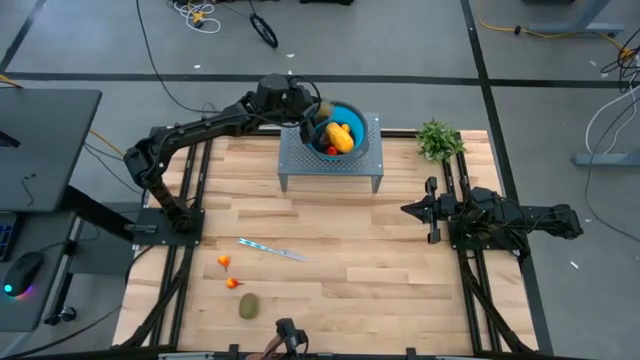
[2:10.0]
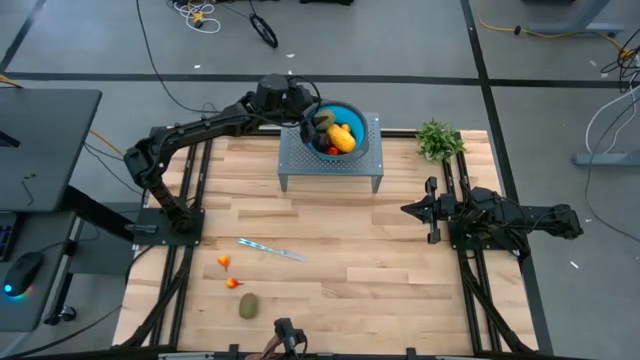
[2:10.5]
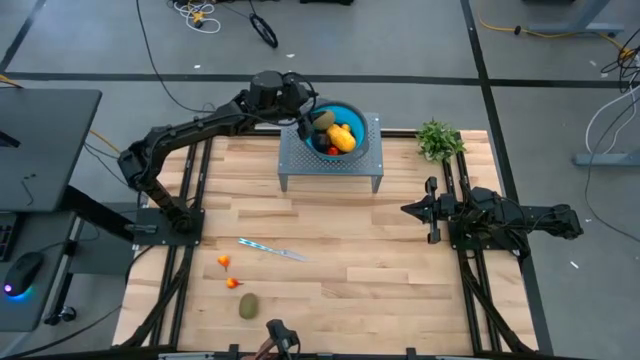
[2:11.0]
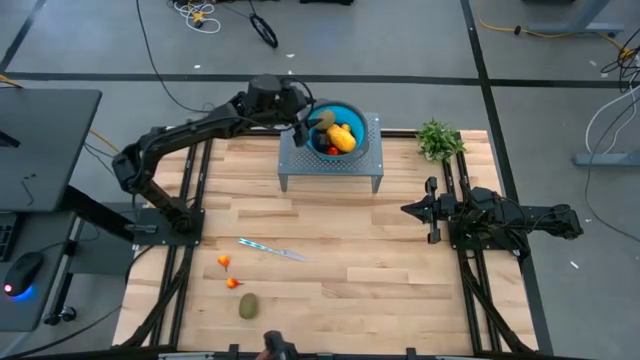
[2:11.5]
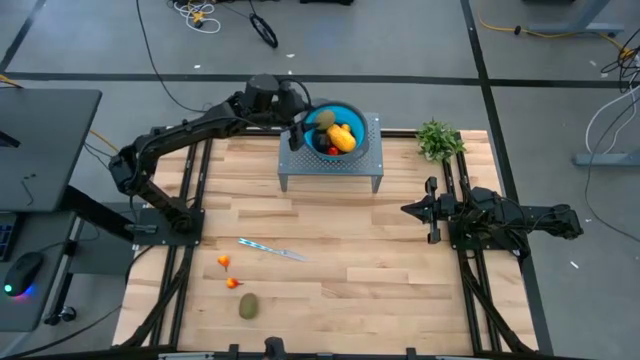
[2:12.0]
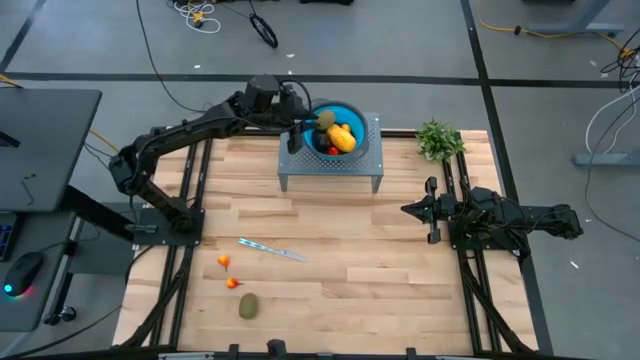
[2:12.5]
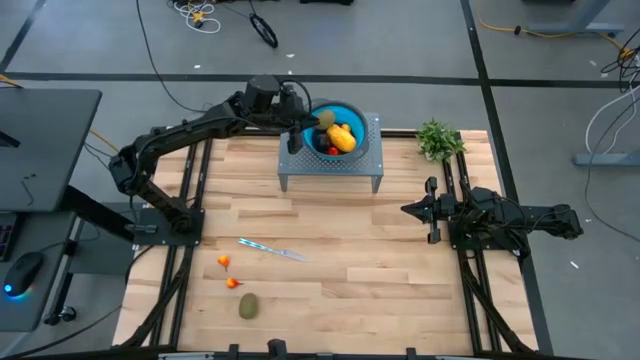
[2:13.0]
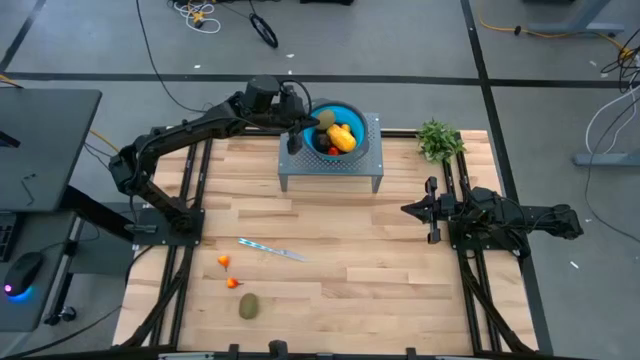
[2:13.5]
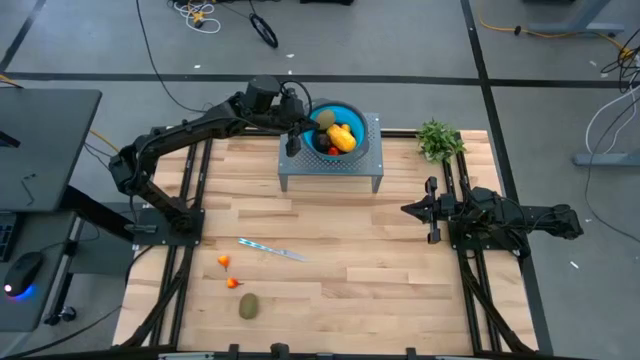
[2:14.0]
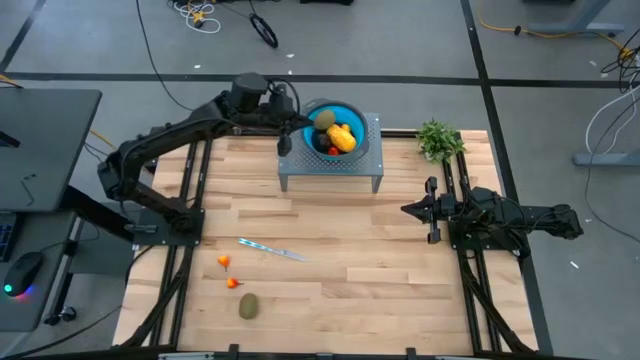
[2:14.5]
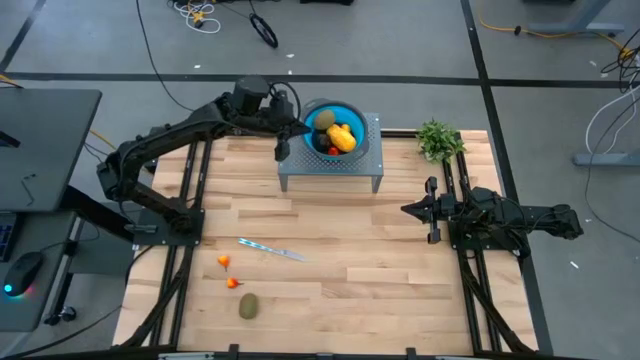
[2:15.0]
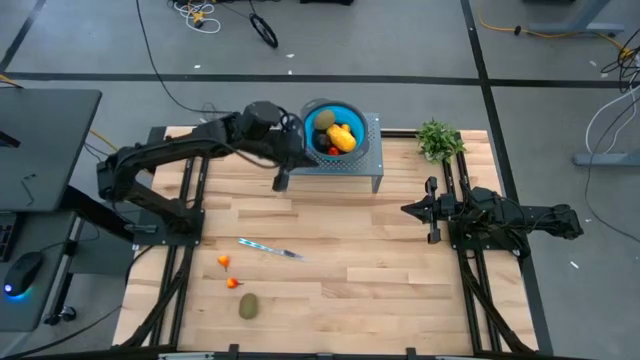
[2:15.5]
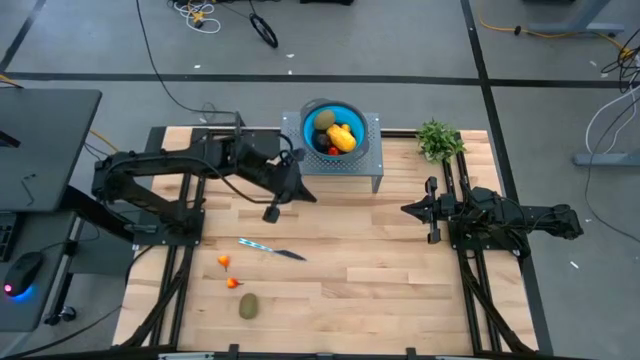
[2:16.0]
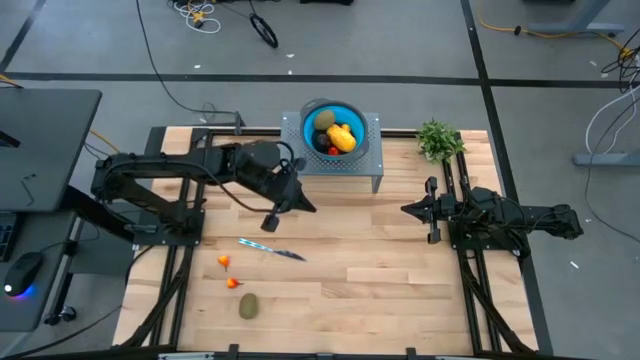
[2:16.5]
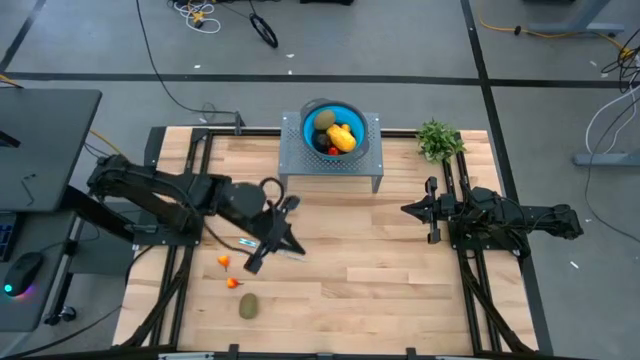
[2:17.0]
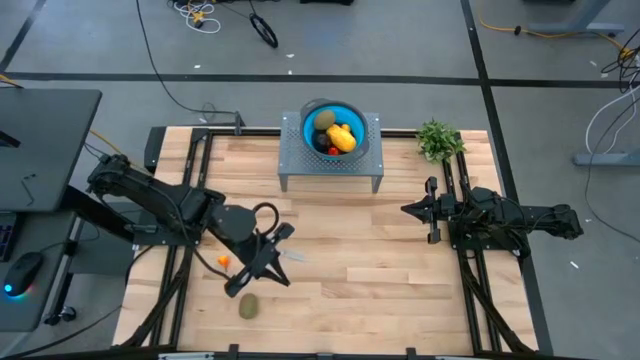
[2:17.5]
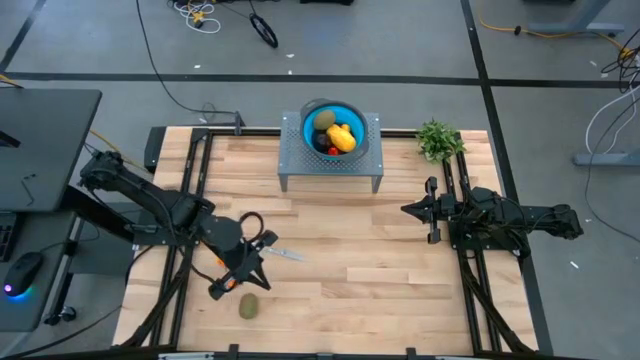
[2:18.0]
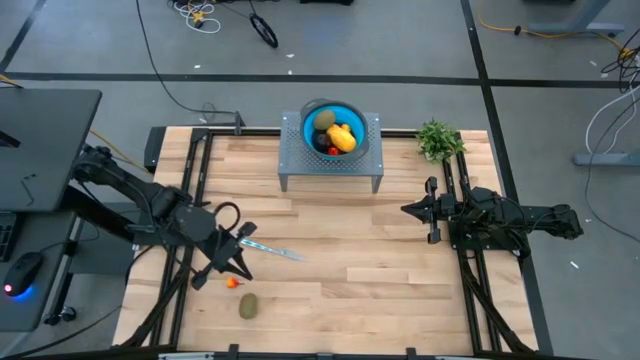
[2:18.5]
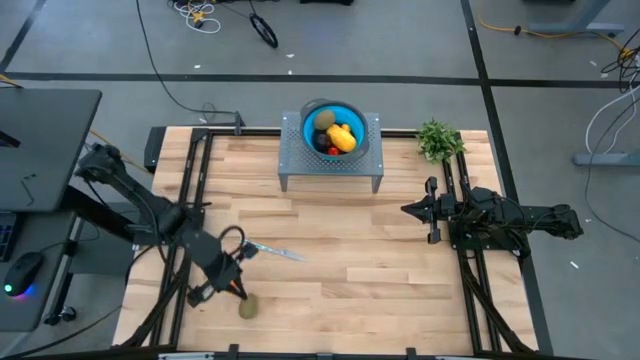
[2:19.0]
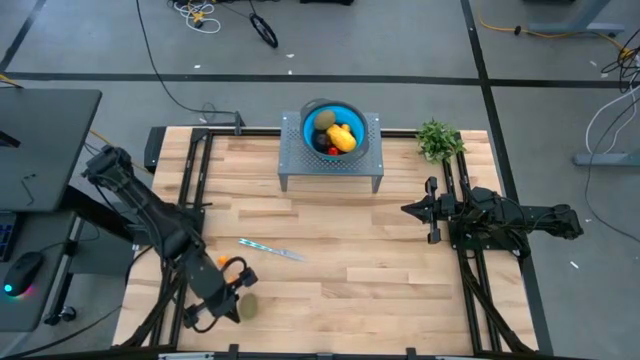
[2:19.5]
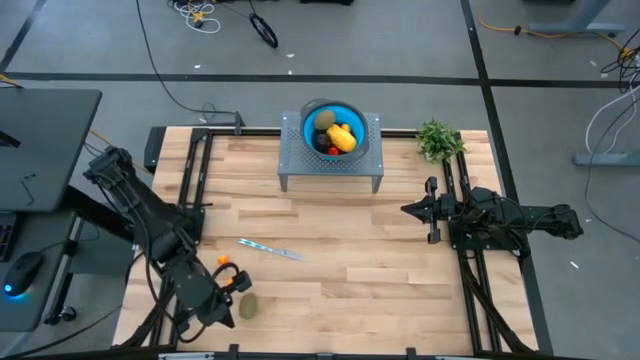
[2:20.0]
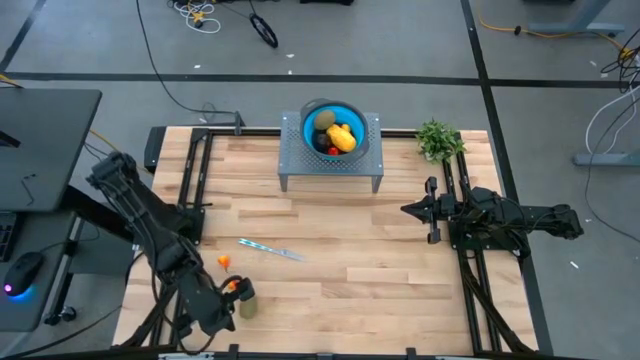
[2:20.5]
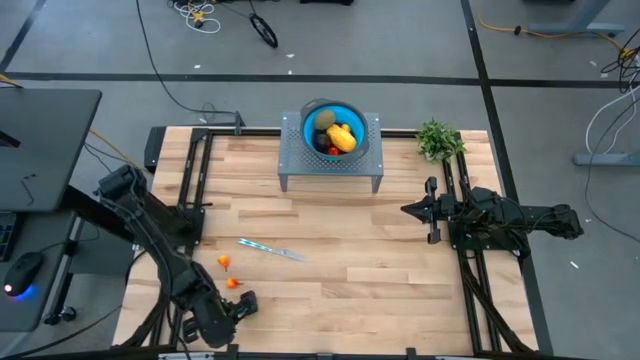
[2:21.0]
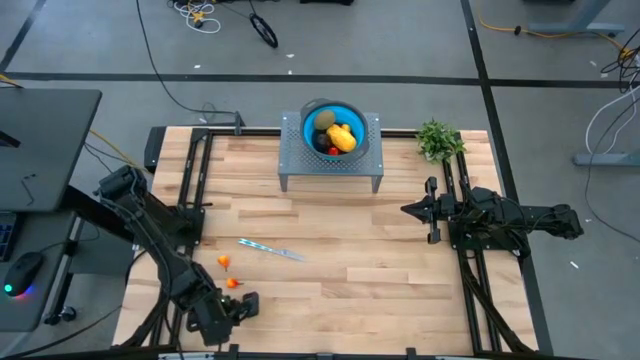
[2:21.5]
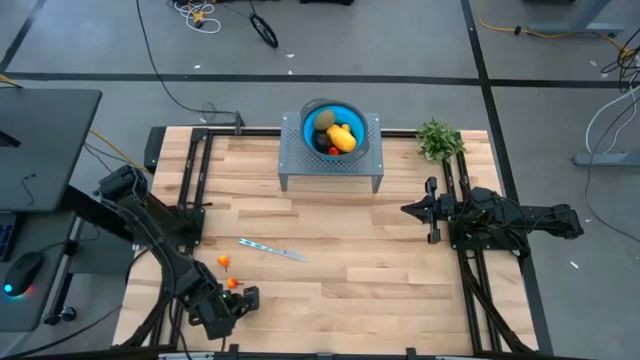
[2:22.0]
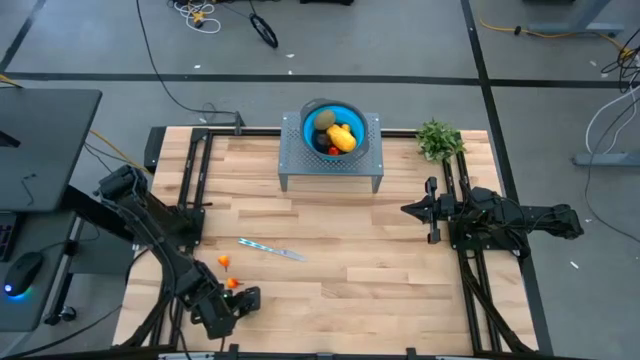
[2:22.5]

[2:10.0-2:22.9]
Task: Pick & Place Fruit
Put the kiwi into the blue bin

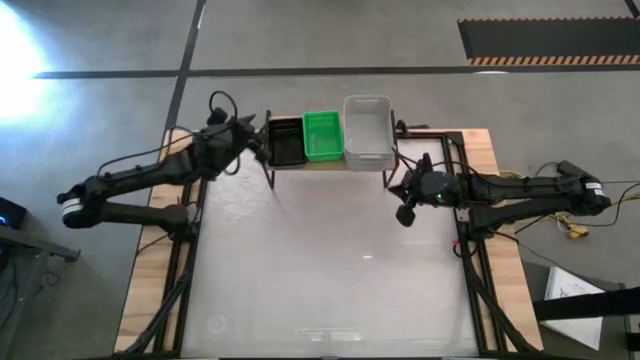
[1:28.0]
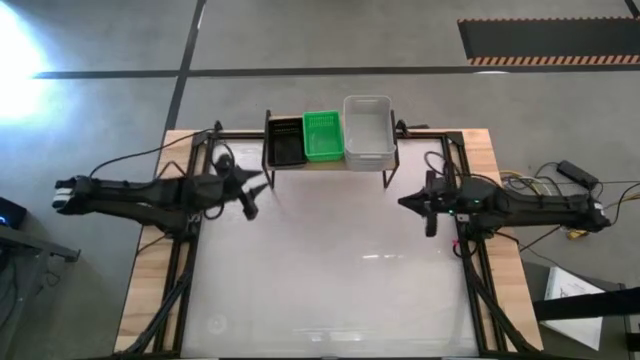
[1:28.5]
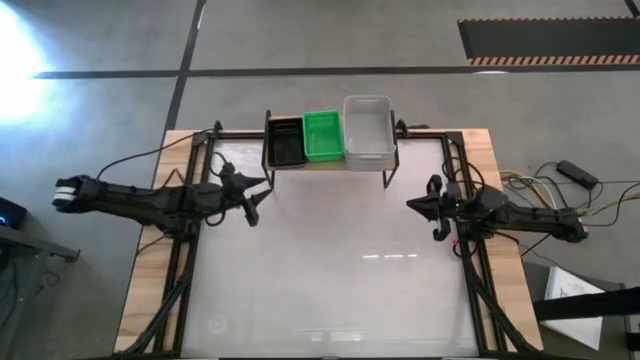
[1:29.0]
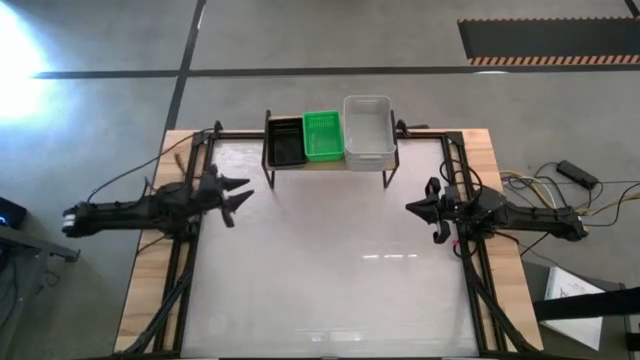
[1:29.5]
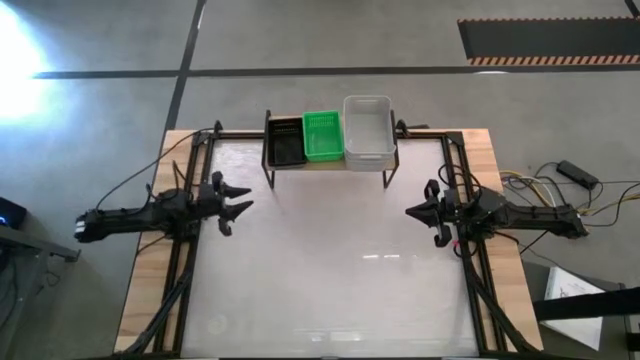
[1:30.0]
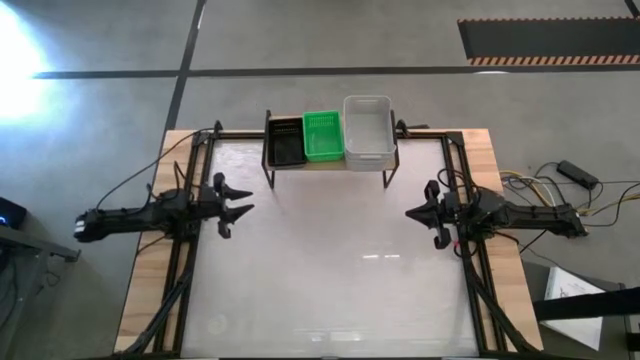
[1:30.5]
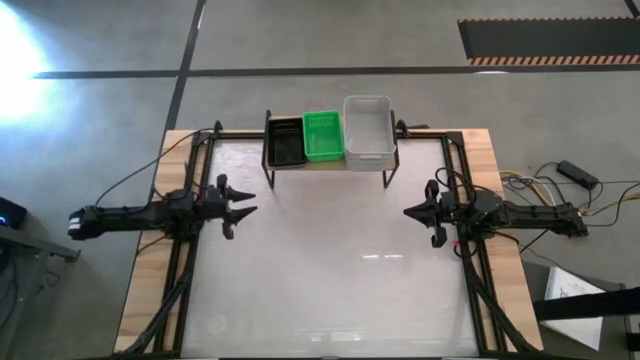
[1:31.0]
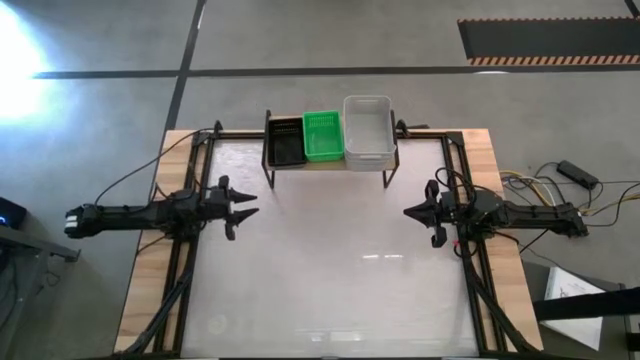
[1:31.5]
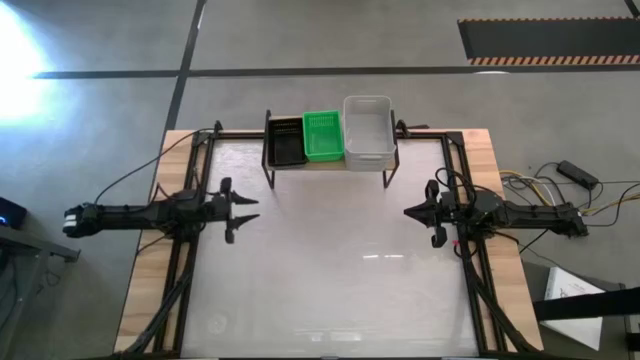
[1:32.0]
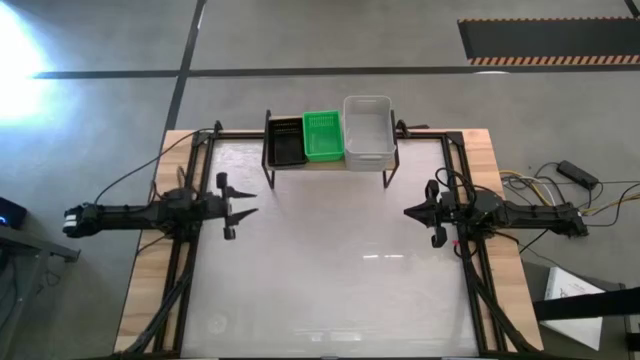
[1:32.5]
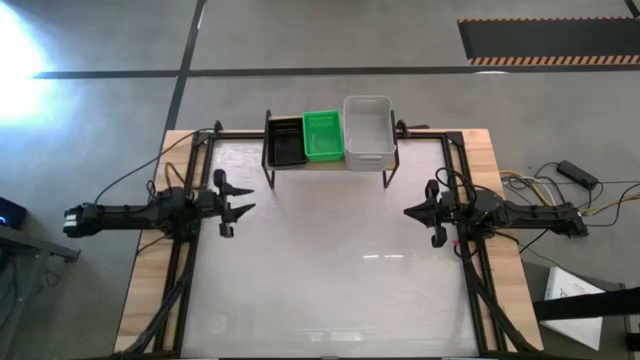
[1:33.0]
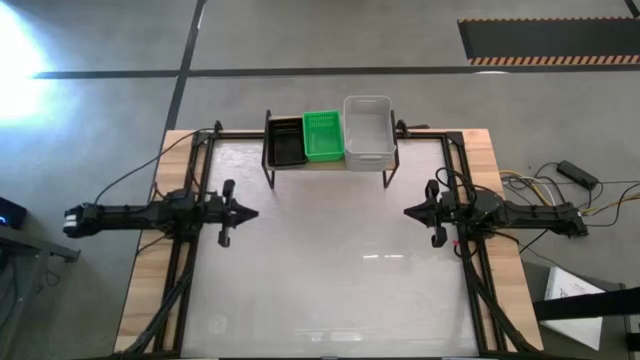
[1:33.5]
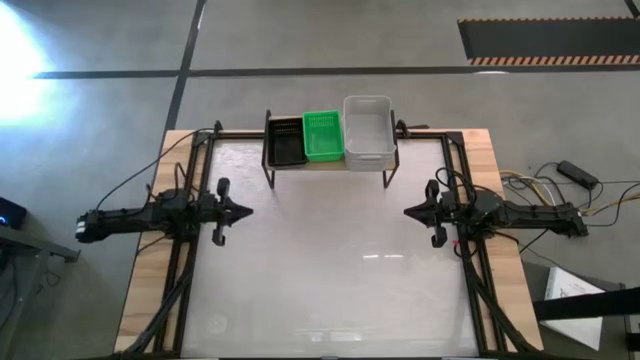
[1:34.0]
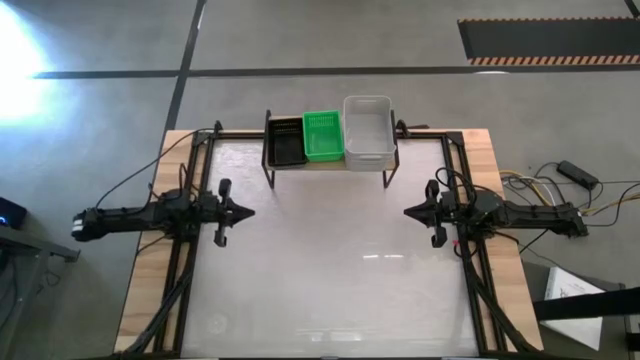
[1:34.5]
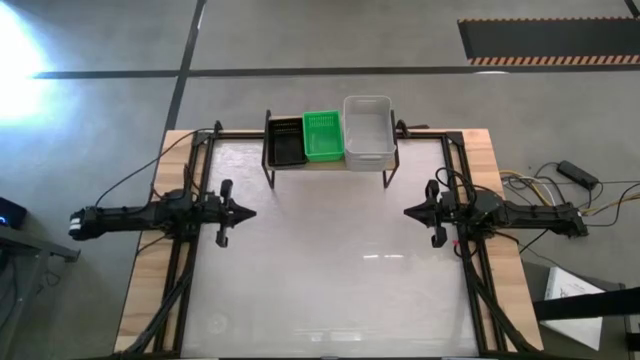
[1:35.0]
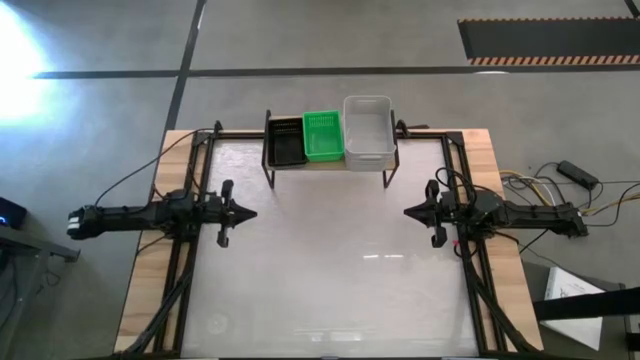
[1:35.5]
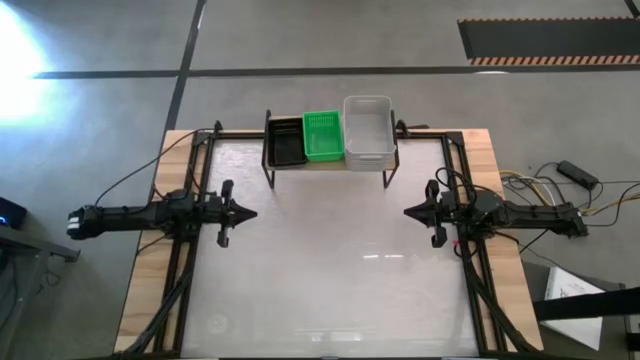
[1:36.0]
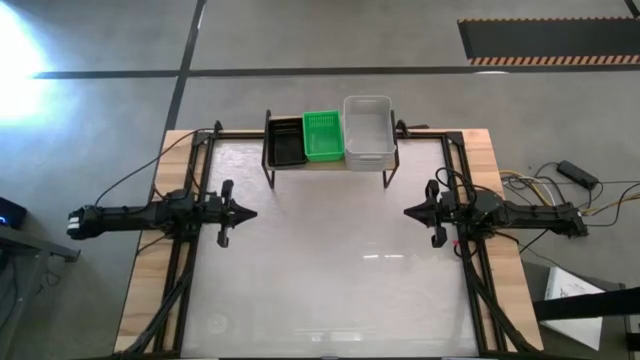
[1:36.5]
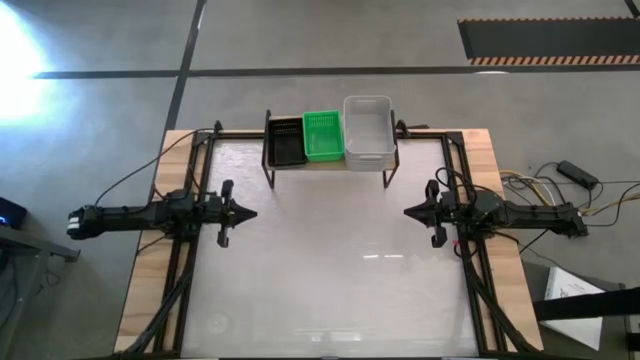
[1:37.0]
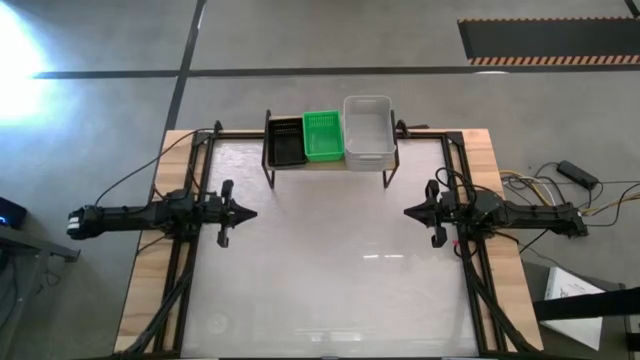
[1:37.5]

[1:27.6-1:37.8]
Task: Stack baskets on shelf by color
Return to Home Position
